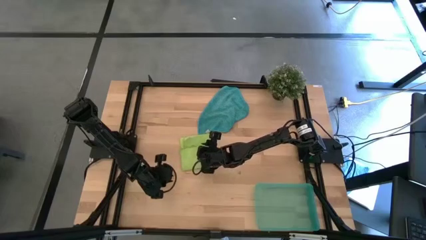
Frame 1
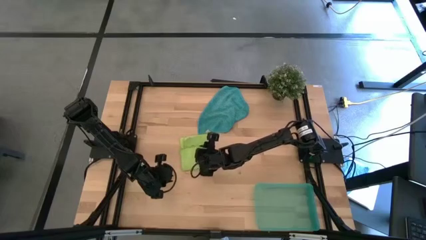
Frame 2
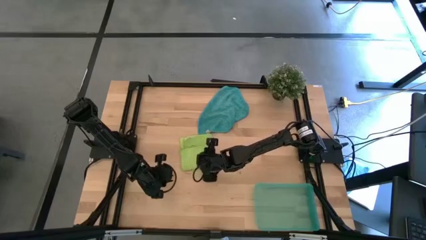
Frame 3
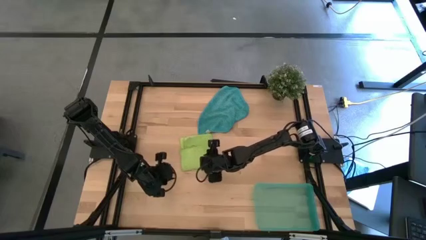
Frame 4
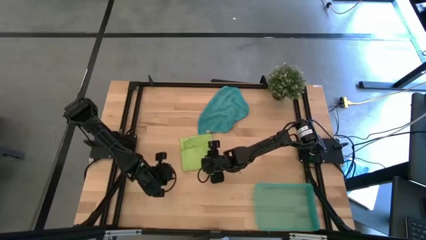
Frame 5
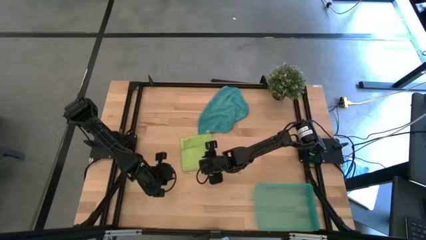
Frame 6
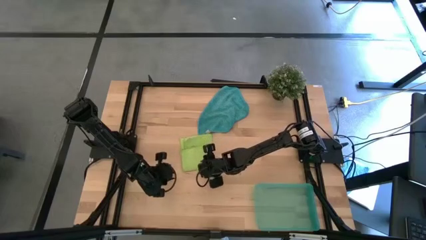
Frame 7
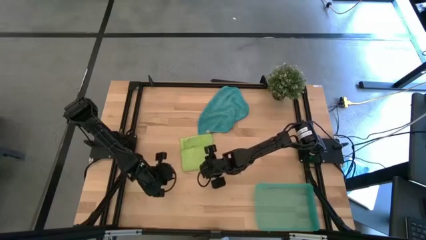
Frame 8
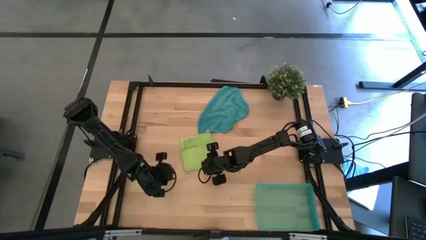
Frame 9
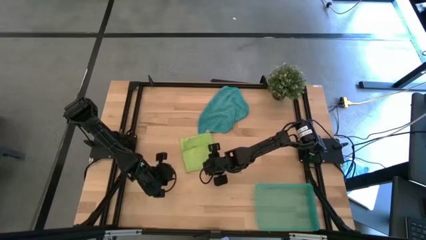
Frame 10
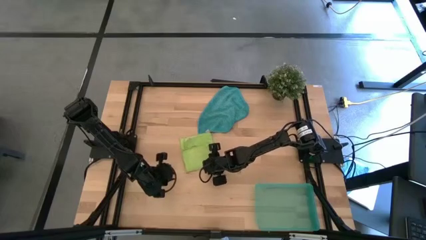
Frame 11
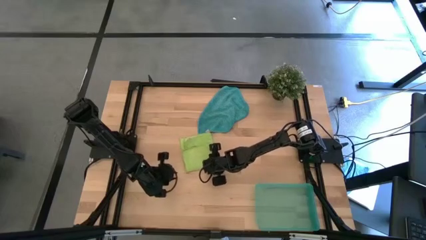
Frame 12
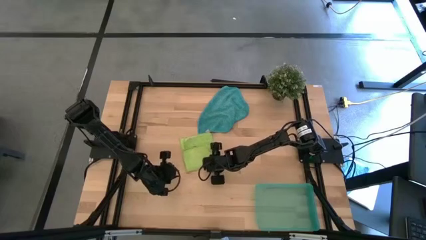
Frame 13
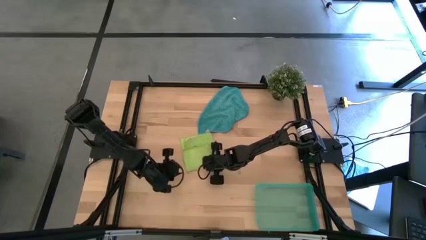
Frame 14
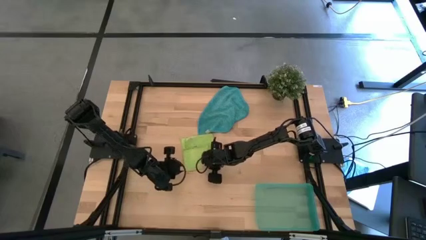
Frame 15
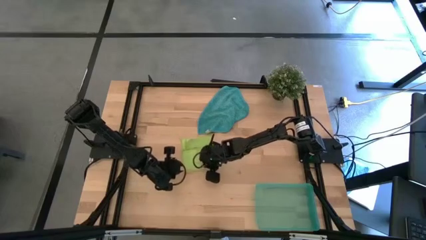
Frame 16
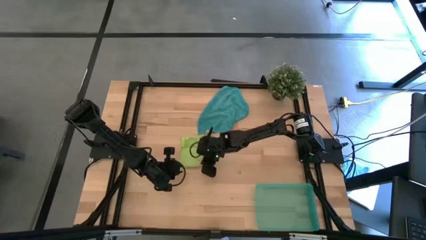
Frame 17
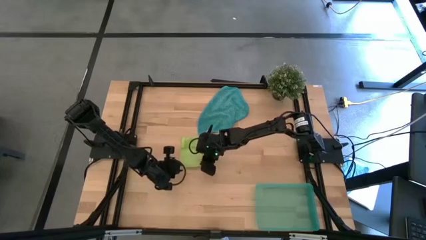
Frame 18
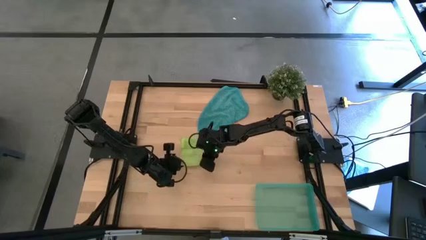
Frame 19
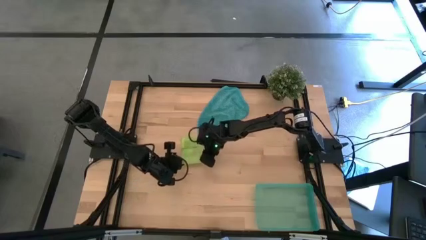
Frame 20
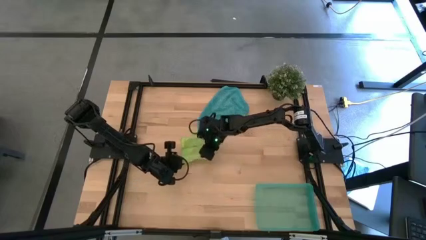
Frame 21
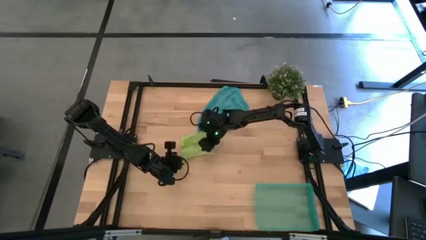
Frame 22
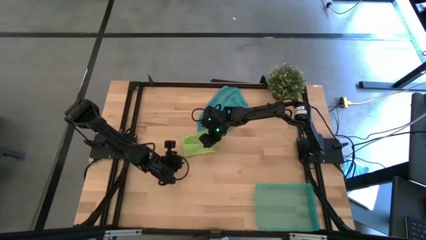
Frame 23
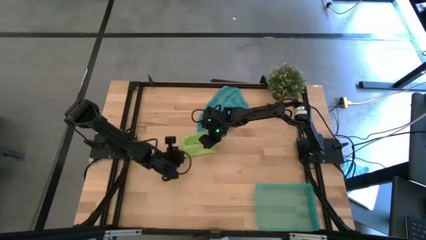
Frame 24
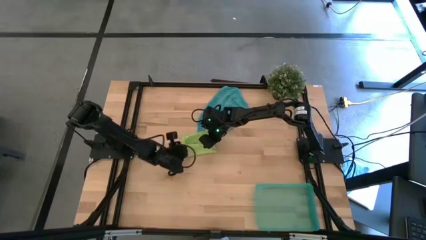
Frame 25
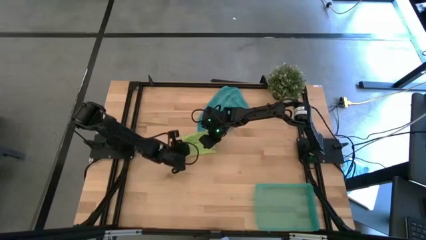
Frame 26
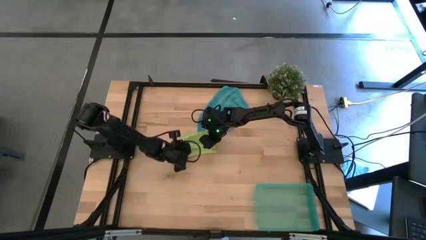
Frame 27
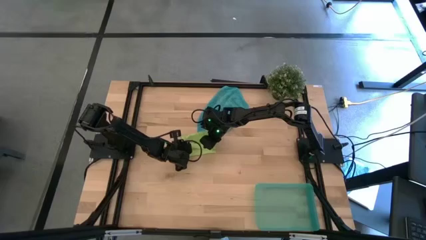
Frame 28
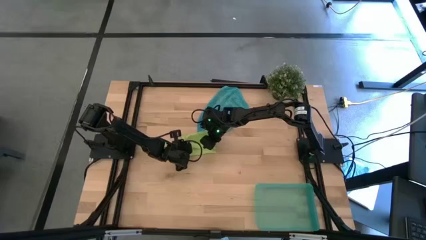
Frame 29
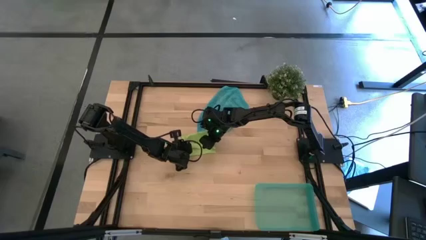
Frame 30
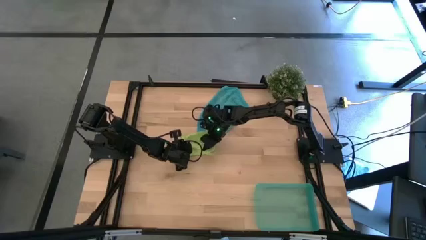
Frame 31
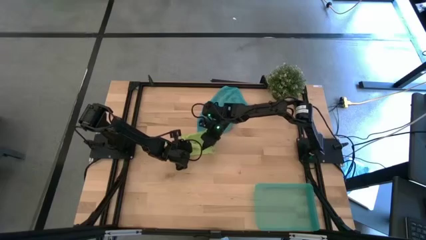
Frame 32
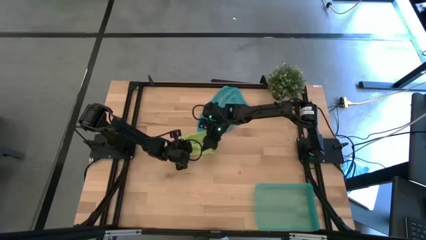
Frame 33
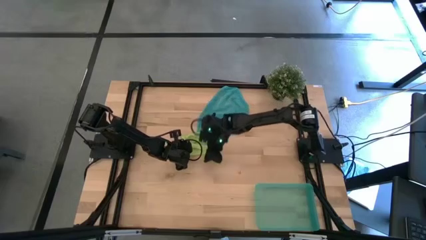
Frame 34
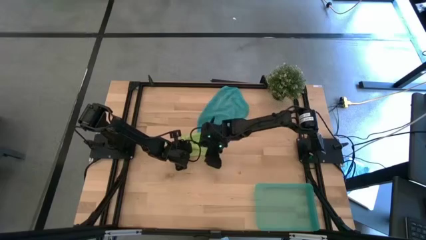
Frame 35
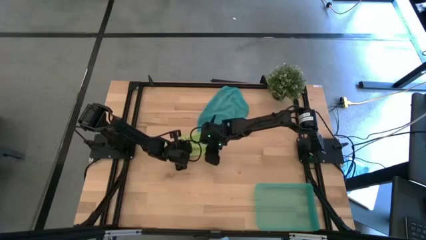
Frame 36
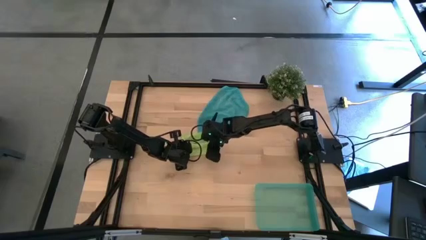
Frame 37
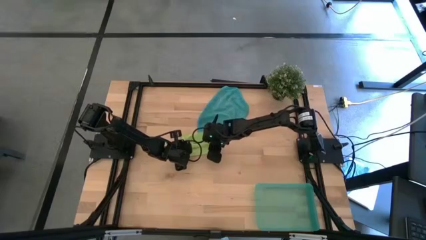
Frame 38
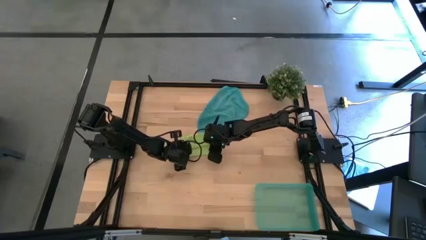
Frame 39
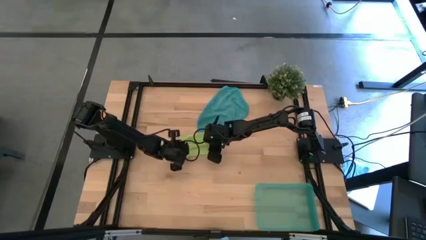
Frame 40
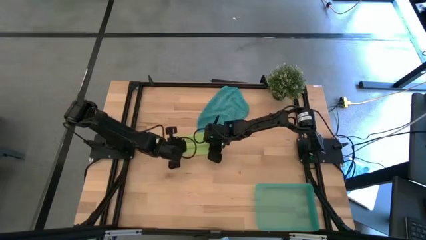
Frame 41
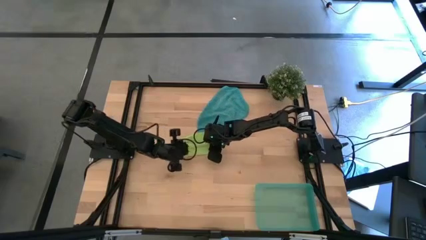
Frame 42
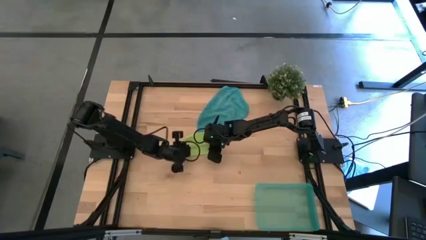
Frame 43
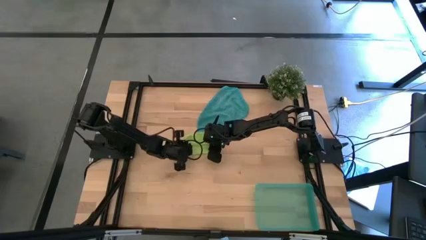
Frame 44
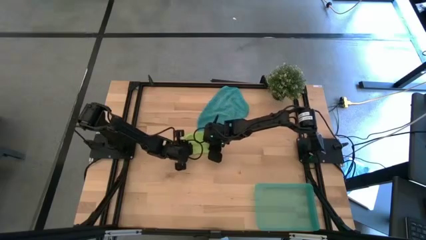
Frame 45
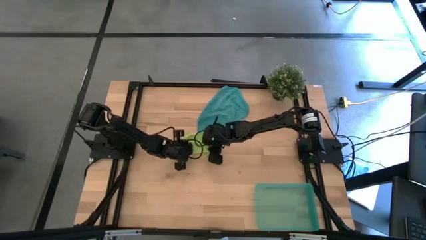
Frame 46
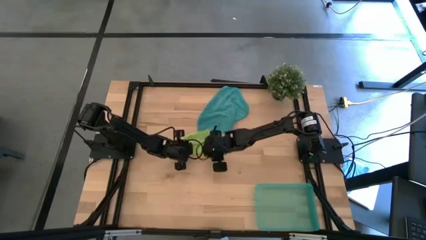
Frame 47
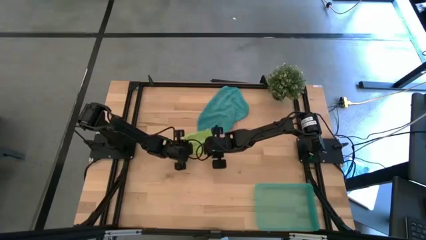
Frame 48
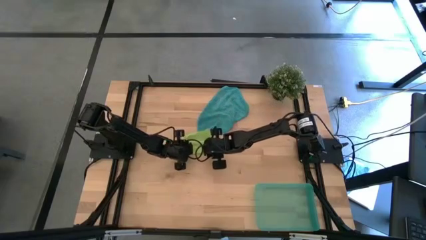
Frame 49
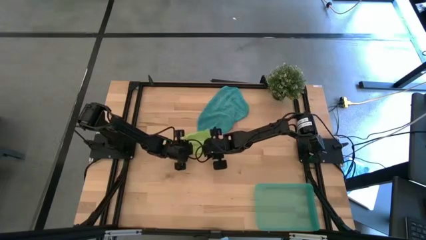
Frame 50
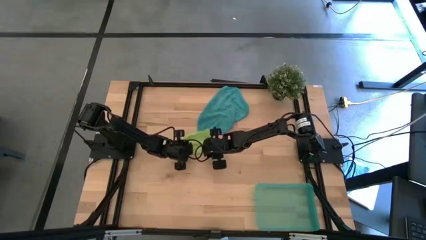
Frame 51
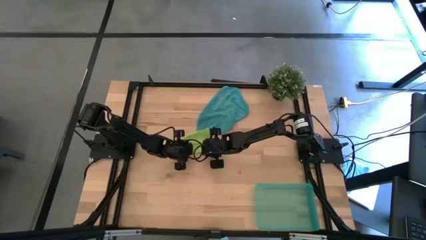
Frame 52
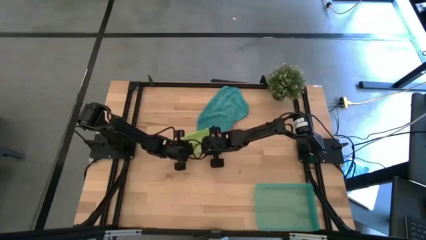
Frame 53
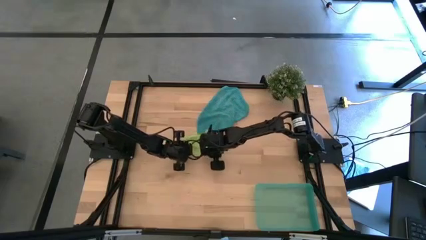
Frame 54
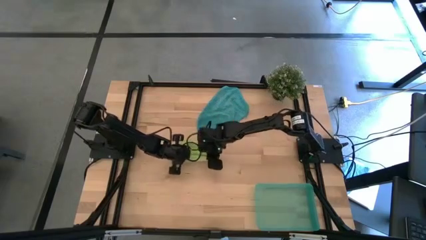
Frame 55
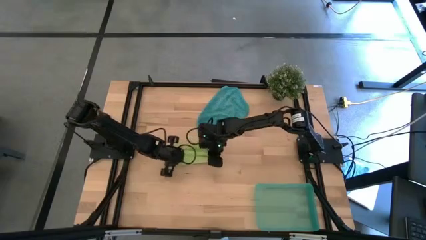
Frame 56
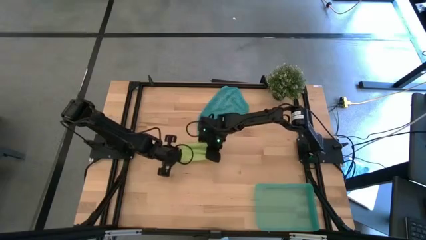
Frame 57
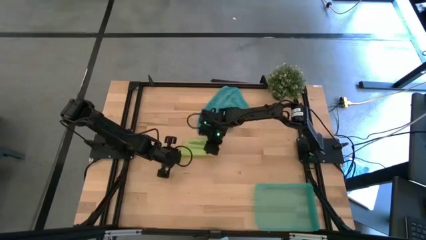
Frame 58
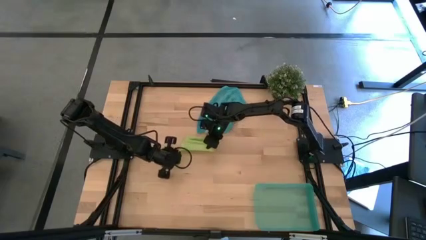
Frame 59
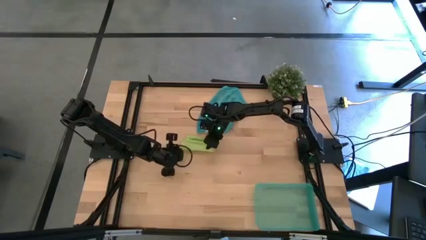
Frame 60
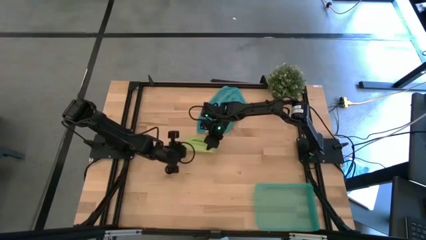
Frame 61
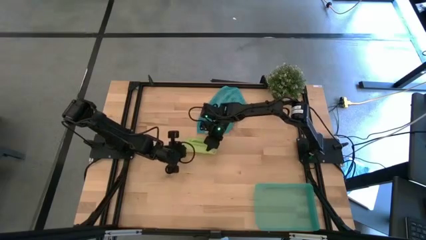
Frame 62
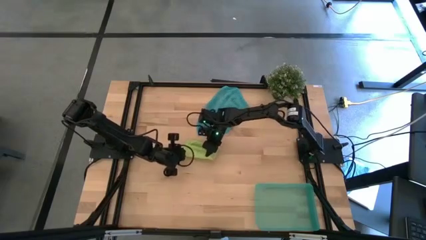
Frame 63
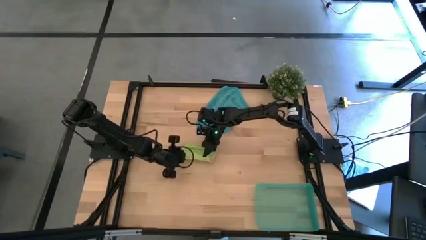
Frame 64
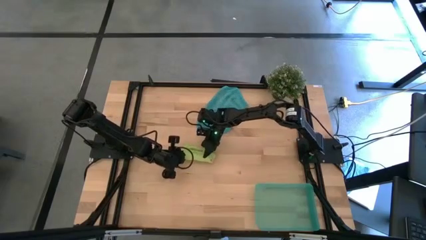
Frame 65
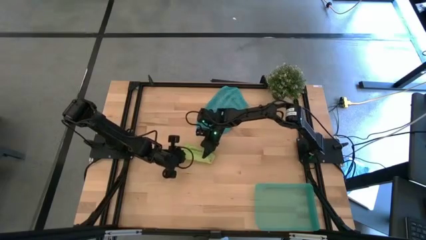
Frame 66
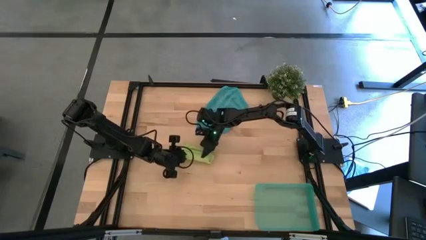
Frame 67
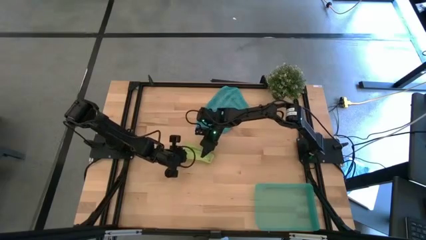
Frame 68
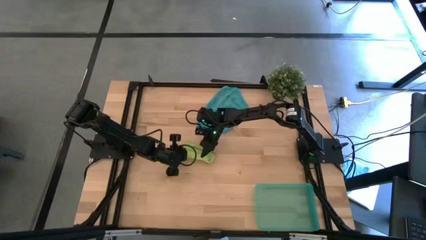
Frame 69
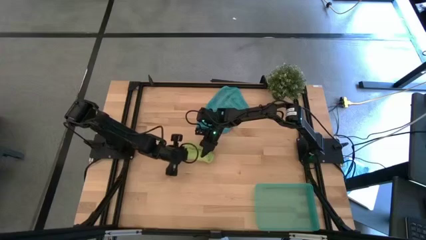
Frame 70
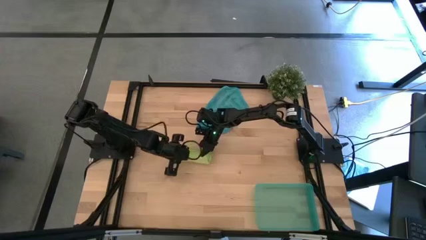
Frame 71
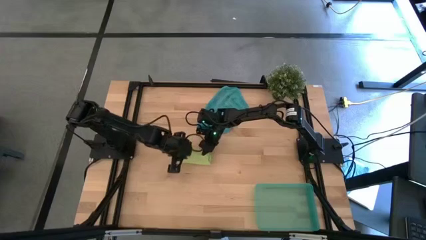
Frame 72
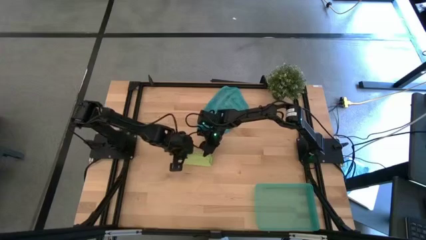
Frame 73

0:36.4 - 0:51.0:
Task: Roll microfiber towels into tight, uniform cylinder then place into a basket
Roll the green microfiber cloth
